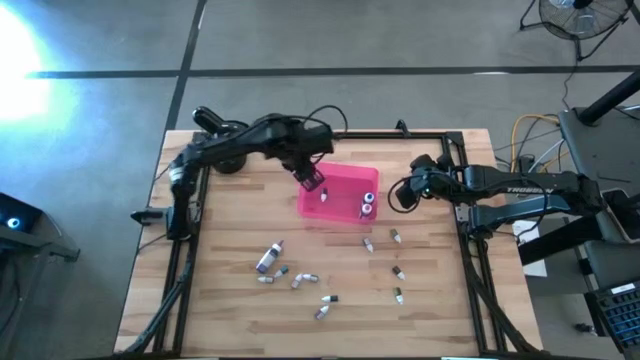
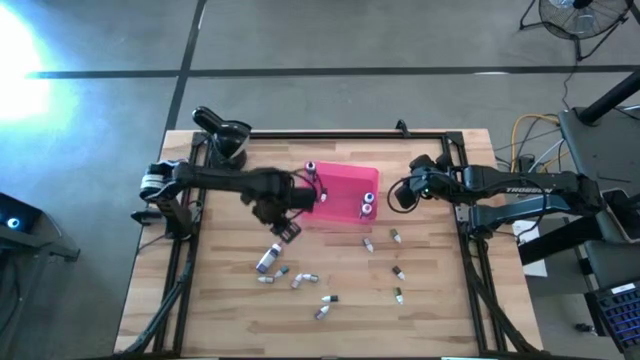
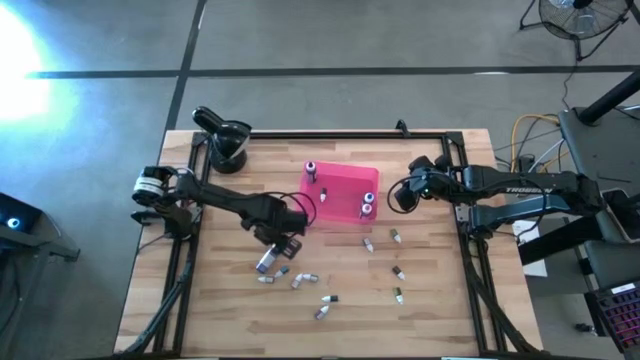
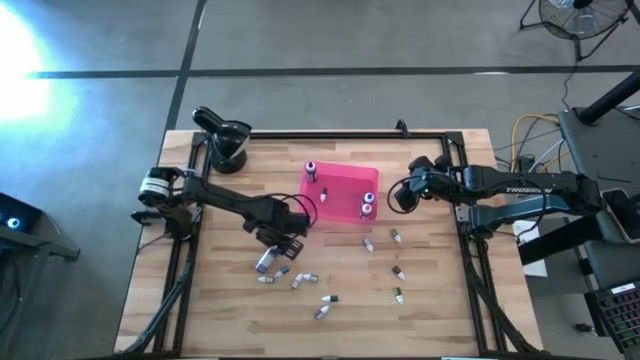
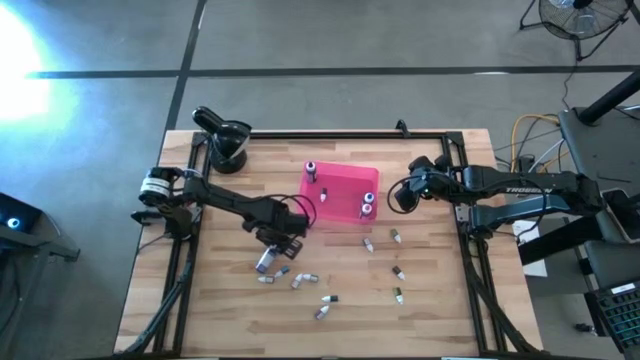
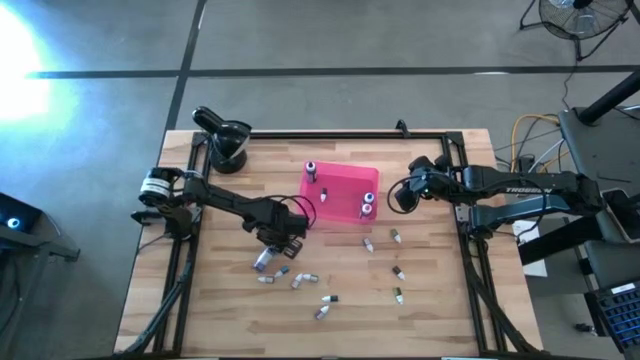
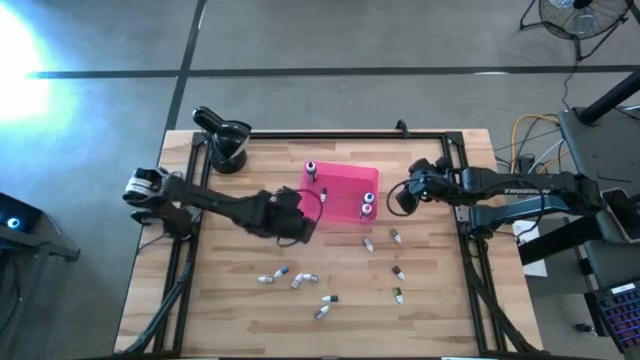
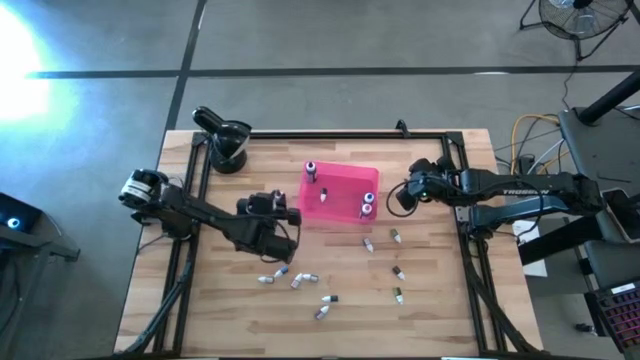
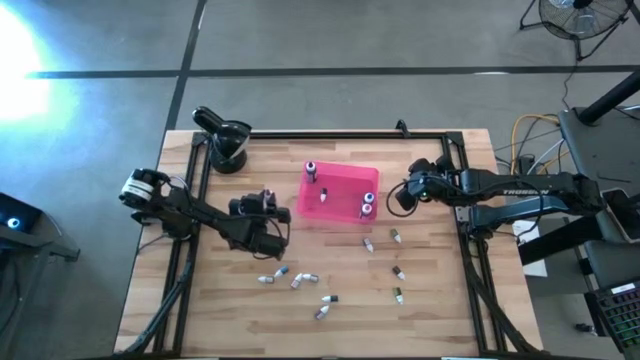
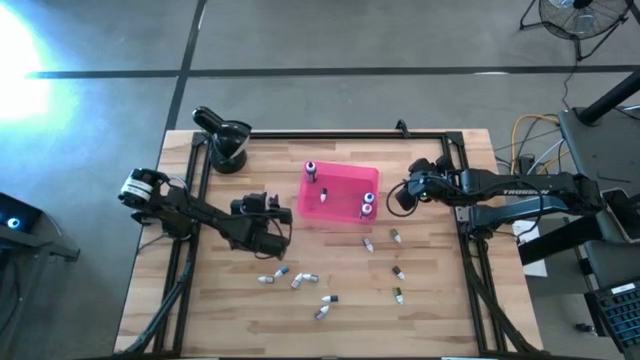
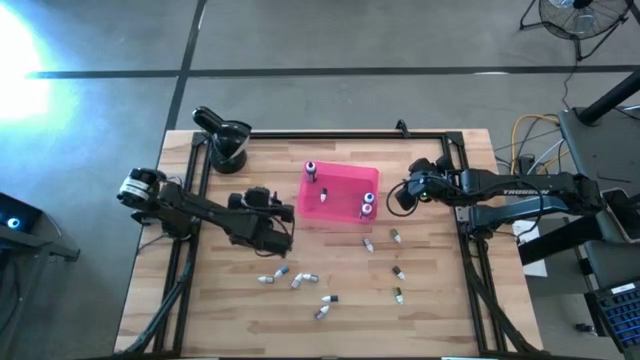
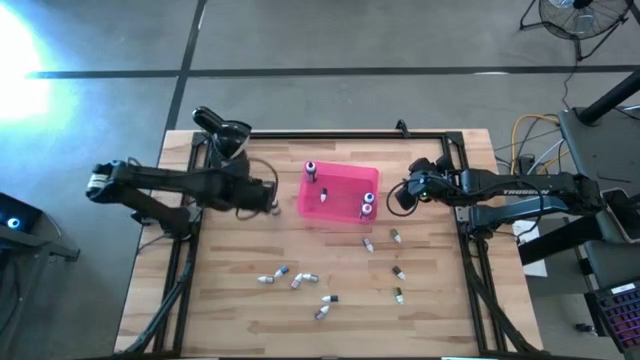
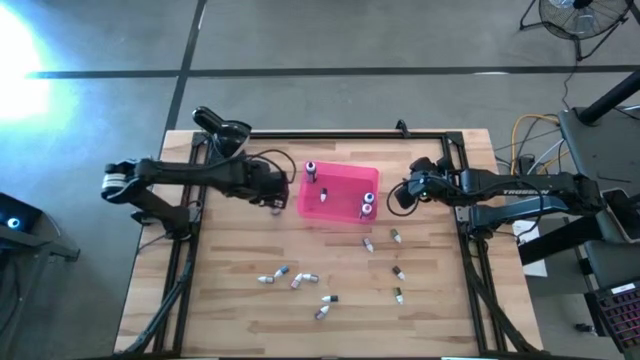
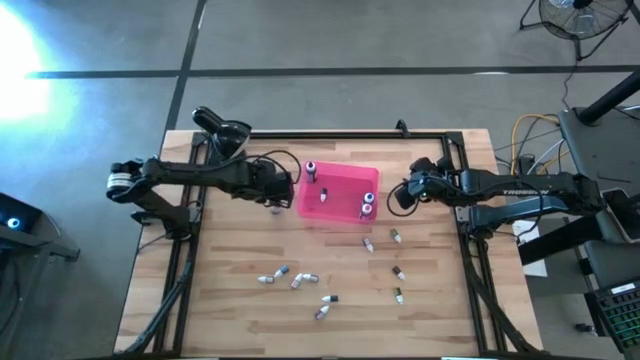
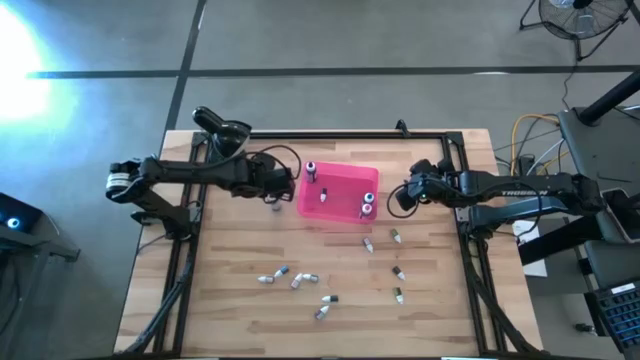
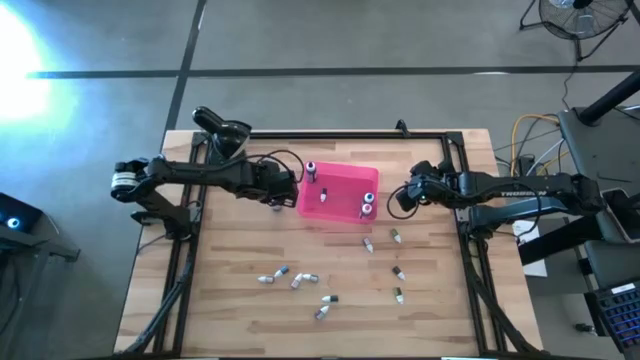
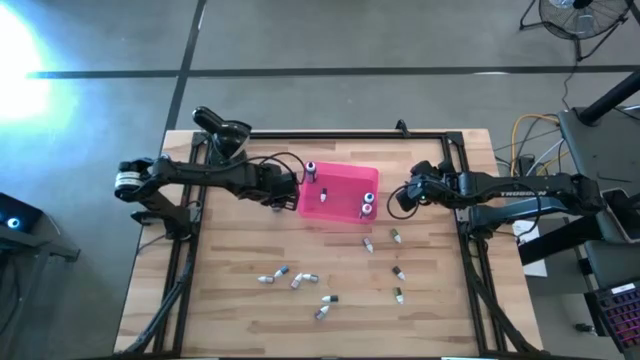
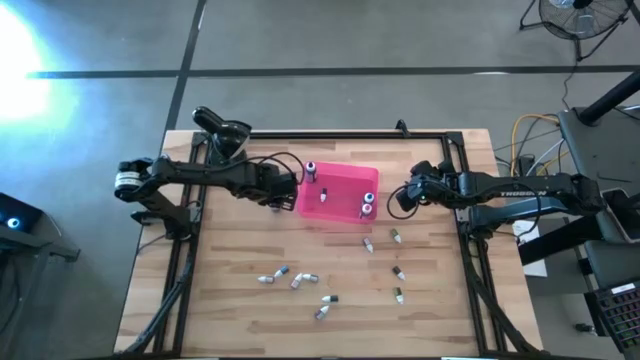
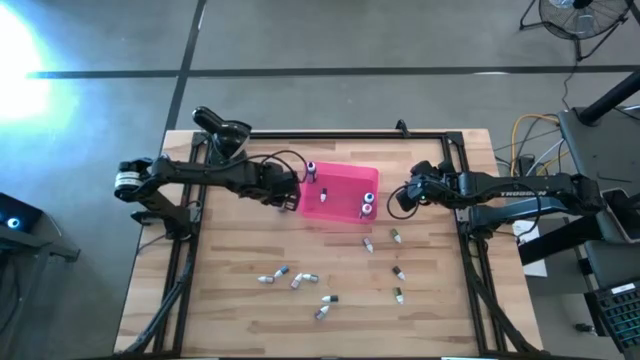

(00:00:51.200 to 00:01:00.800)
Task: Pick & Place food coloring
Put the large purple food coloring bottle into the pink bin

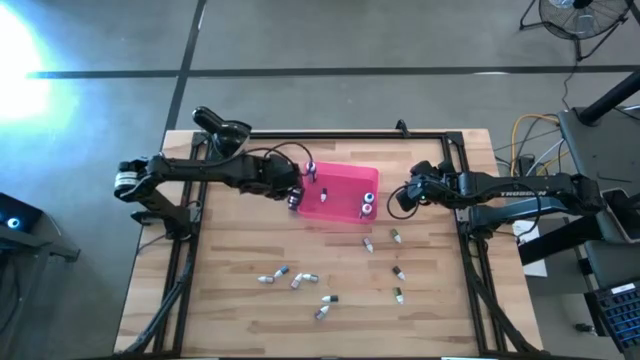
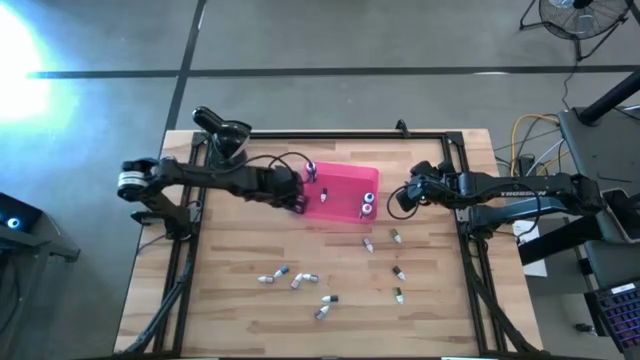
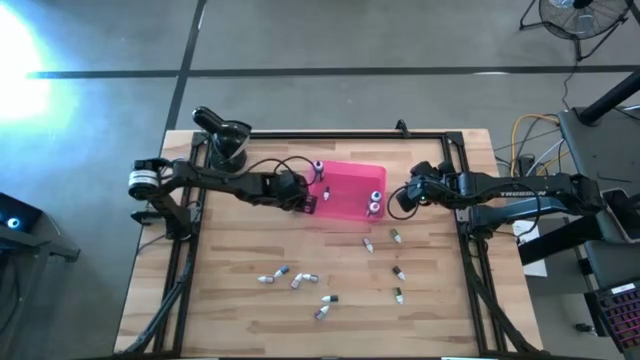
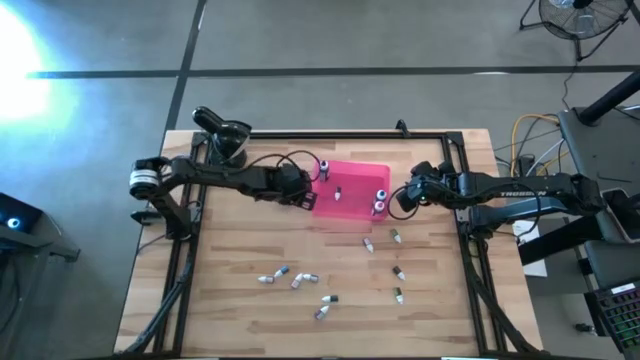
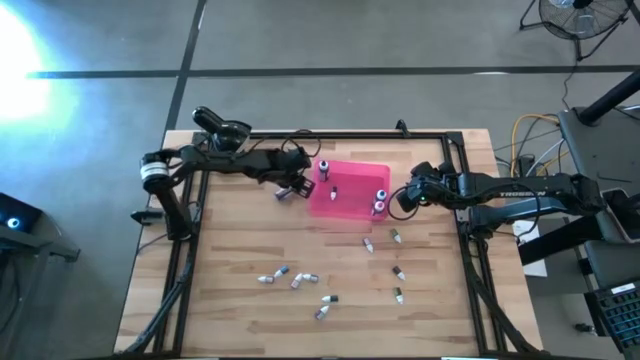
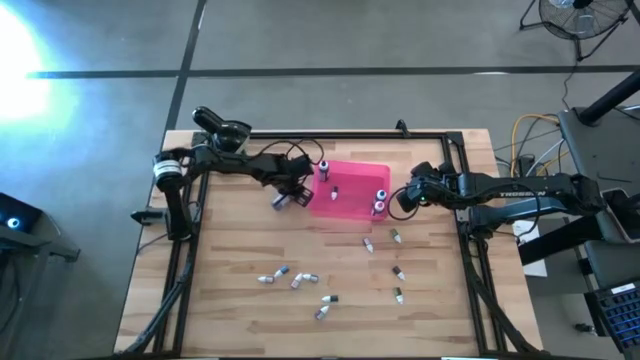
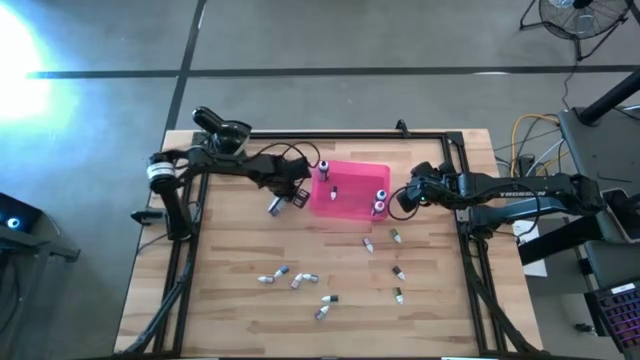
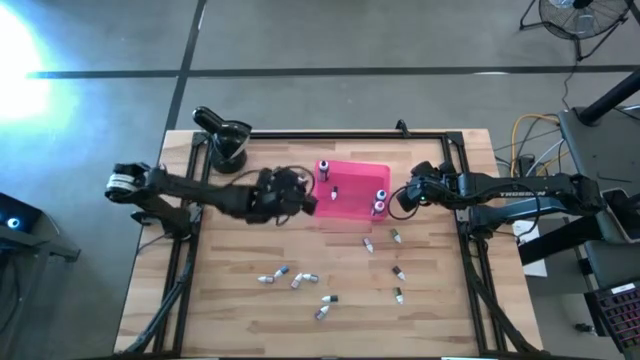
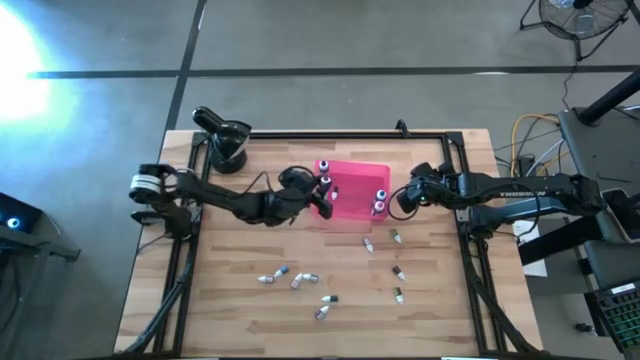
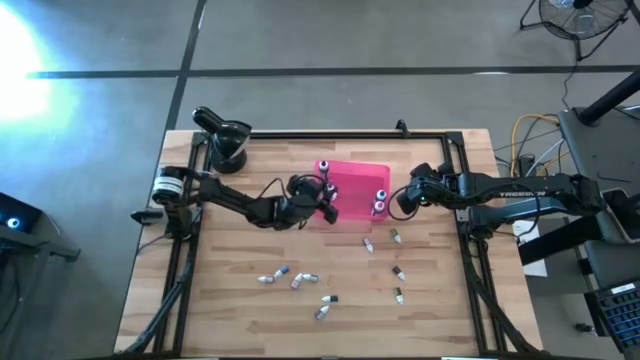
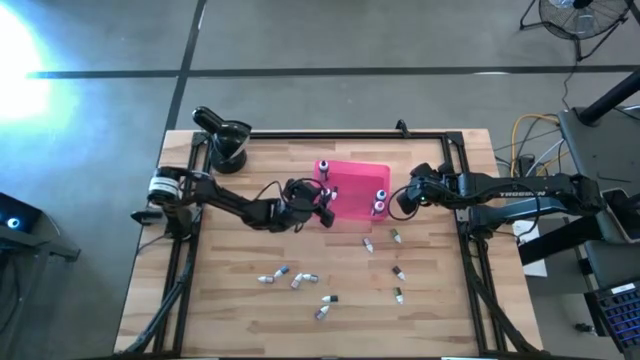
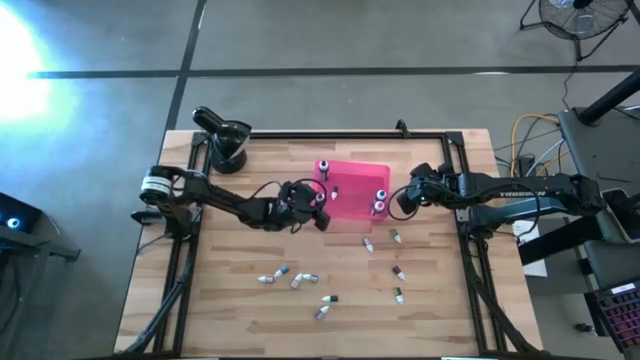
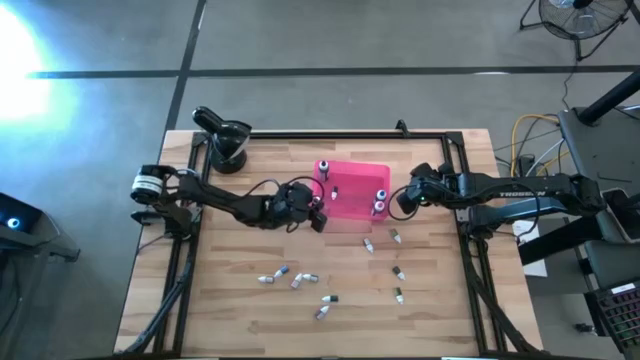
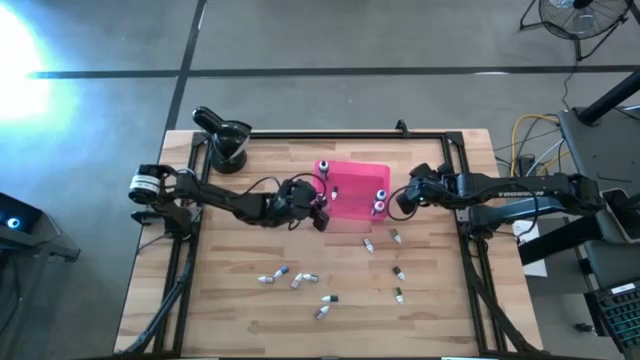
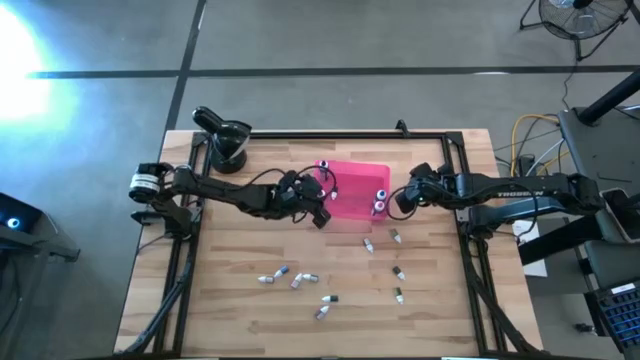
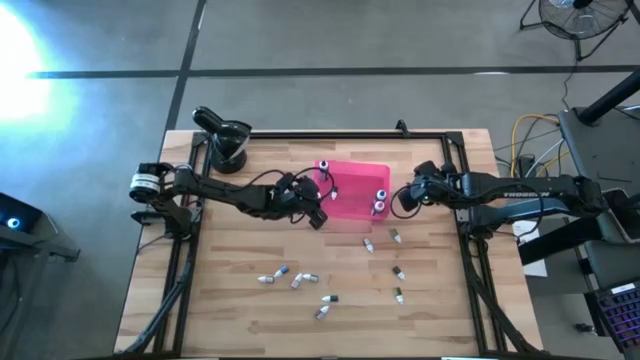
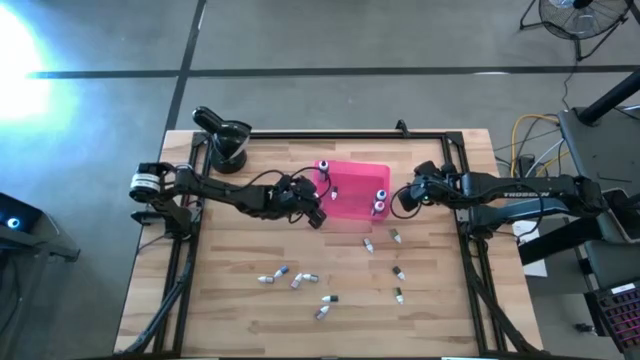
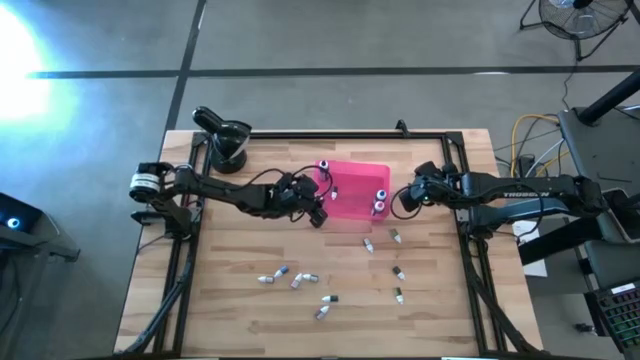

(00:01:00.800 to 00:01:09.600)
Put the large purple food coloring bottle into the pink bin

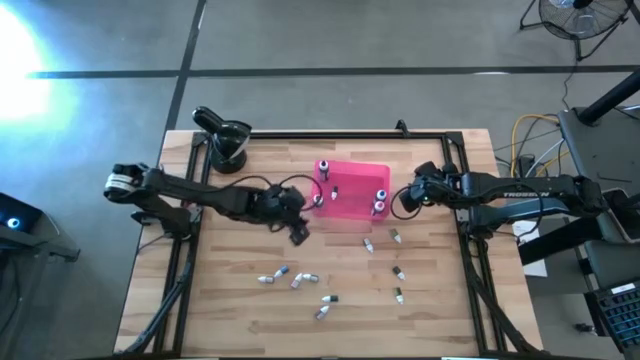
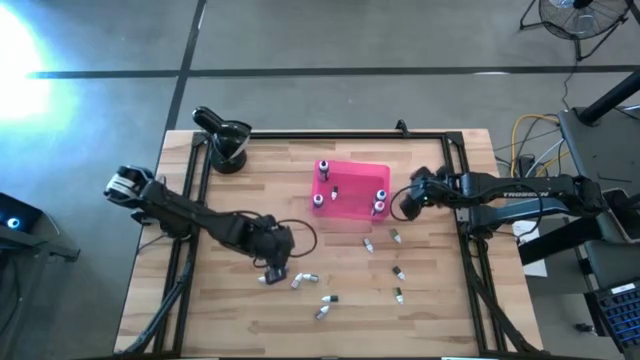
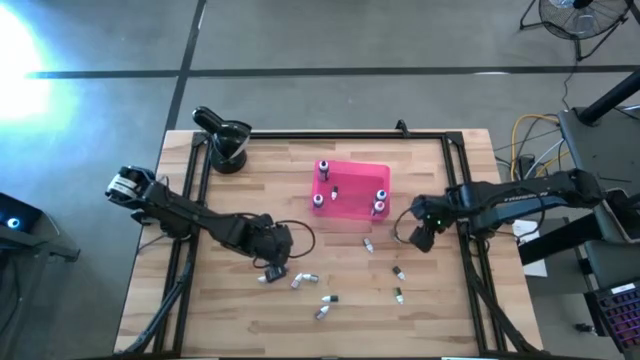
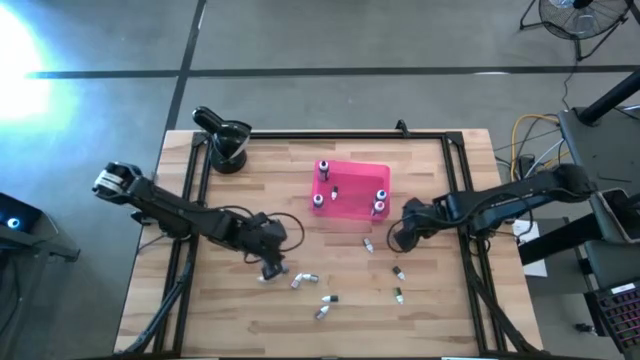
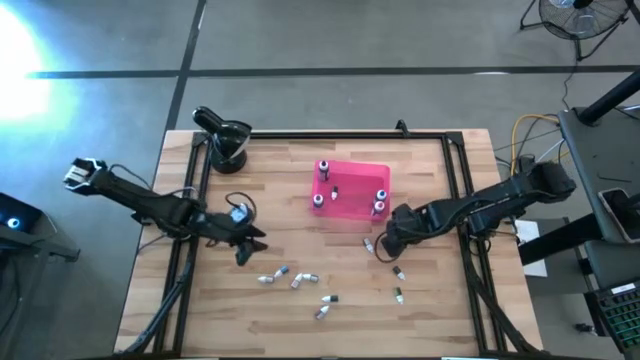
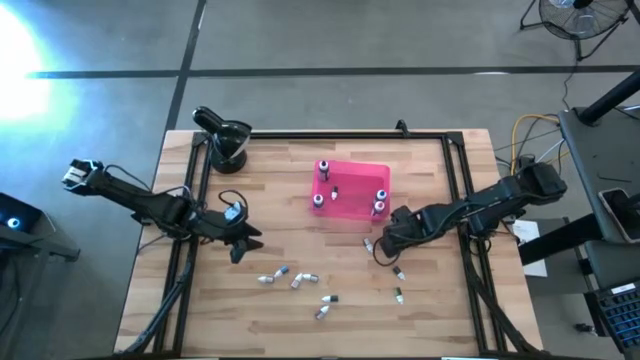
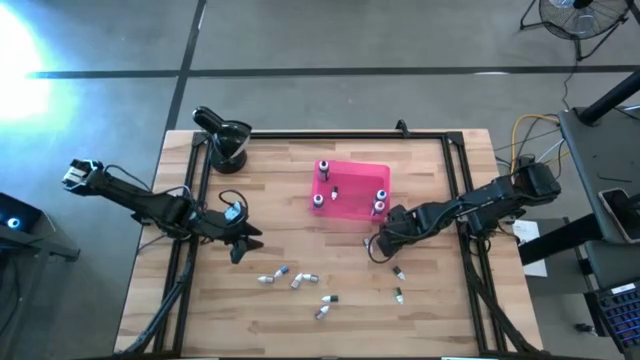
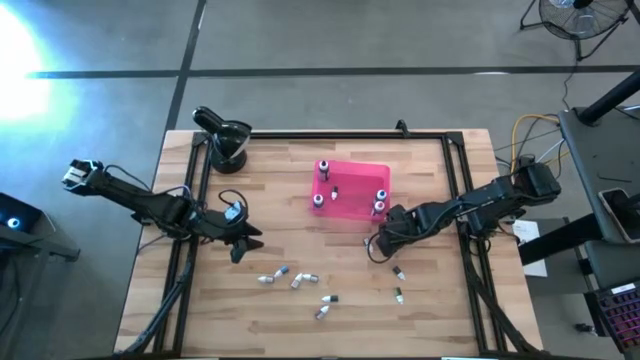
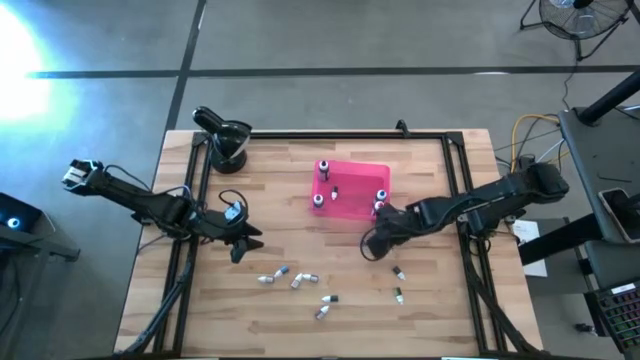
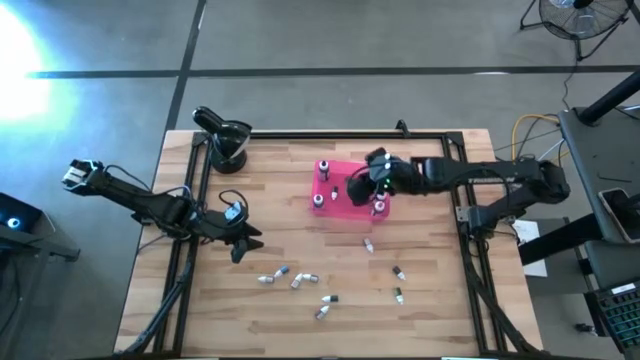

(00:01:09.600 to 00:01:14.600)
Put the top small green food coloring into the pink bin
